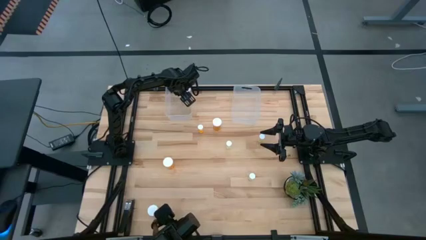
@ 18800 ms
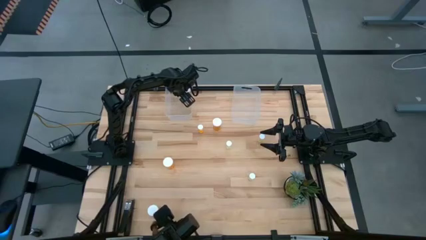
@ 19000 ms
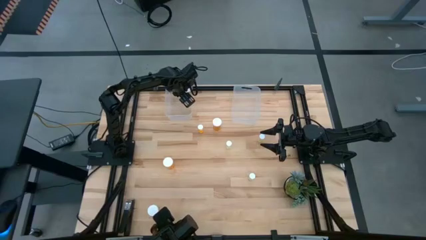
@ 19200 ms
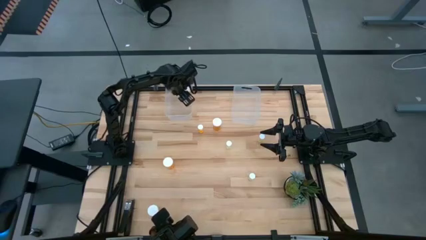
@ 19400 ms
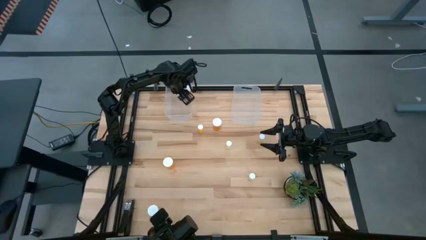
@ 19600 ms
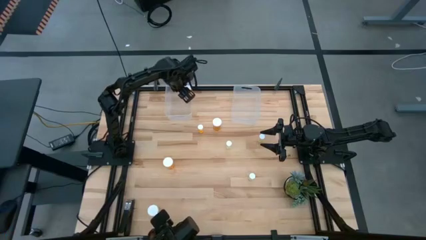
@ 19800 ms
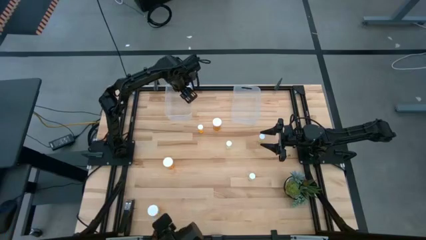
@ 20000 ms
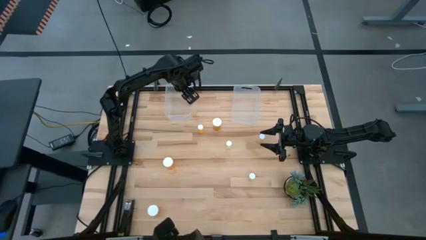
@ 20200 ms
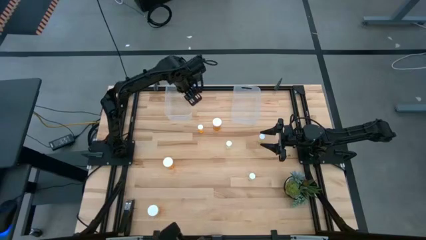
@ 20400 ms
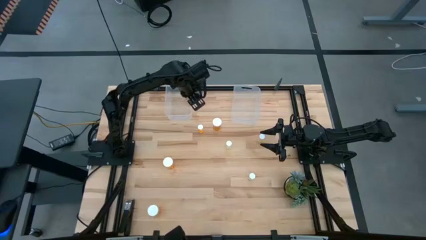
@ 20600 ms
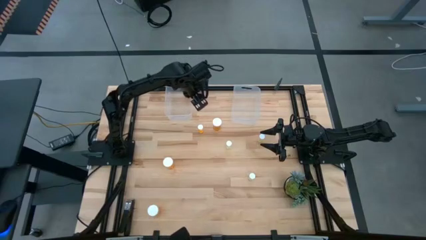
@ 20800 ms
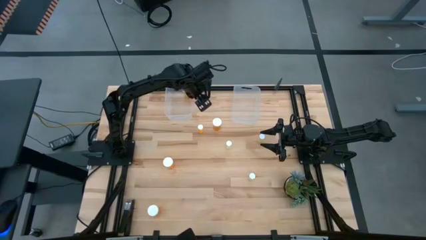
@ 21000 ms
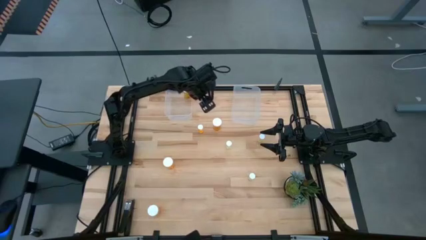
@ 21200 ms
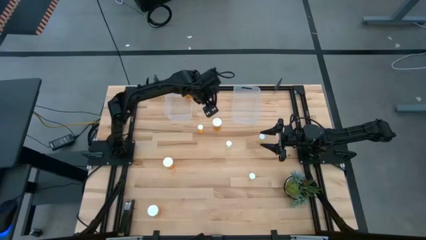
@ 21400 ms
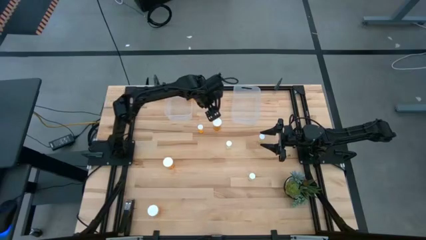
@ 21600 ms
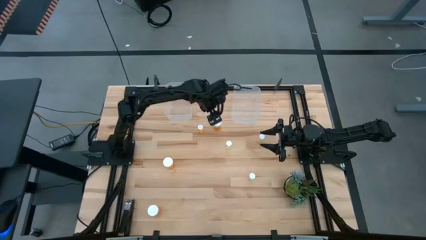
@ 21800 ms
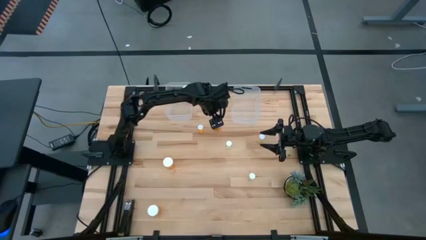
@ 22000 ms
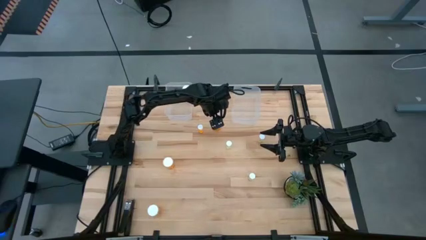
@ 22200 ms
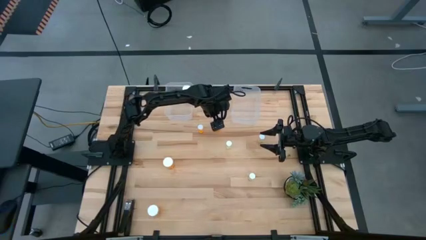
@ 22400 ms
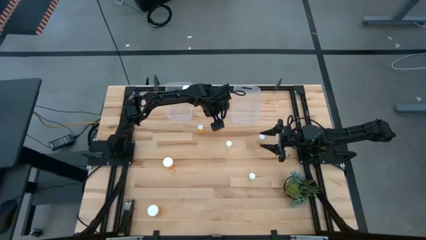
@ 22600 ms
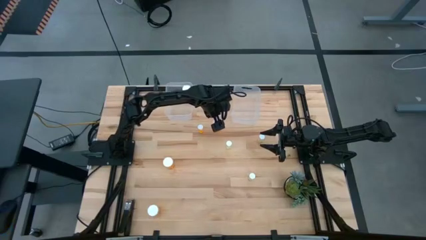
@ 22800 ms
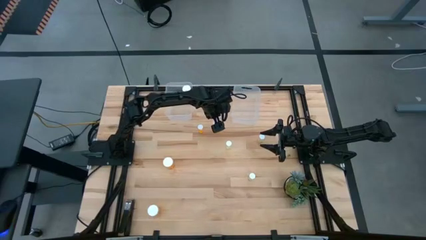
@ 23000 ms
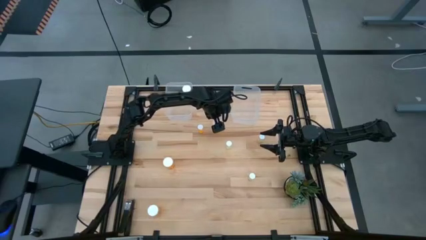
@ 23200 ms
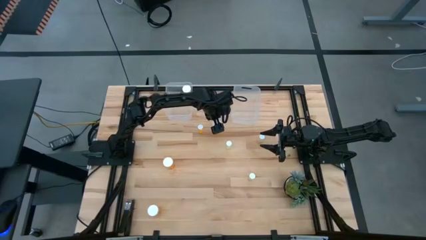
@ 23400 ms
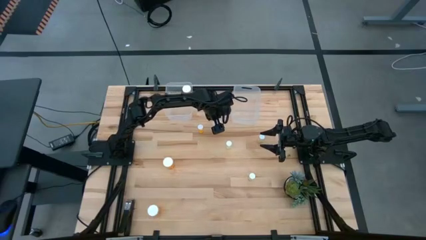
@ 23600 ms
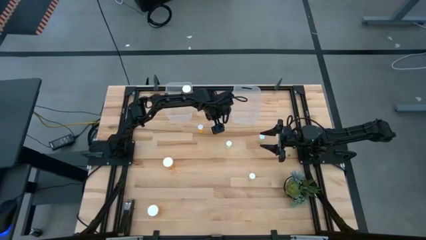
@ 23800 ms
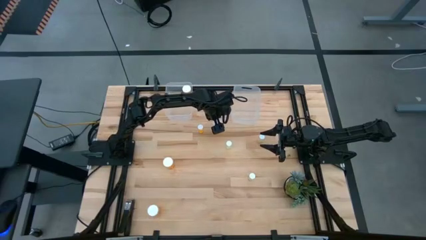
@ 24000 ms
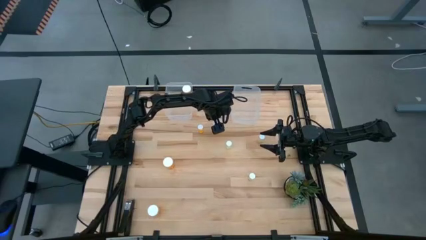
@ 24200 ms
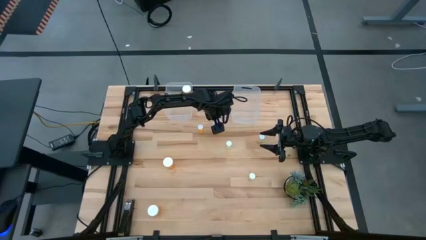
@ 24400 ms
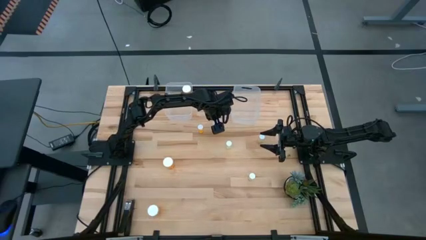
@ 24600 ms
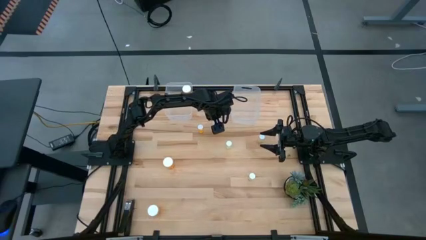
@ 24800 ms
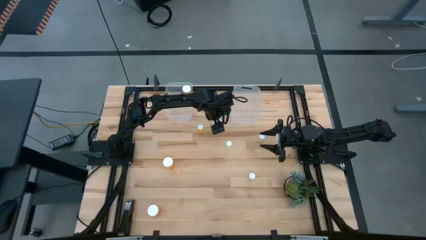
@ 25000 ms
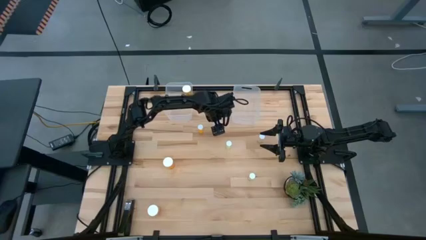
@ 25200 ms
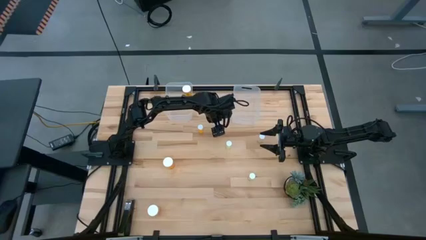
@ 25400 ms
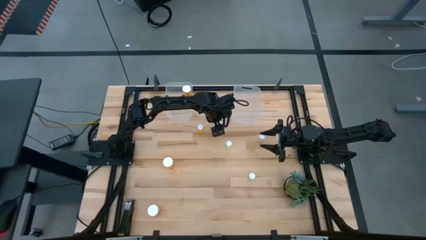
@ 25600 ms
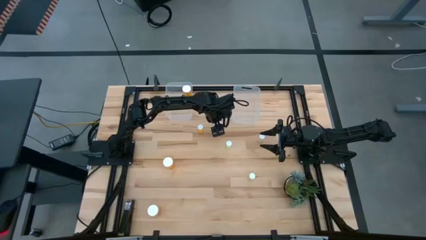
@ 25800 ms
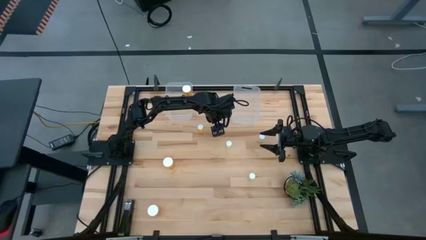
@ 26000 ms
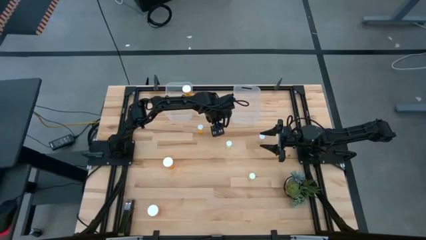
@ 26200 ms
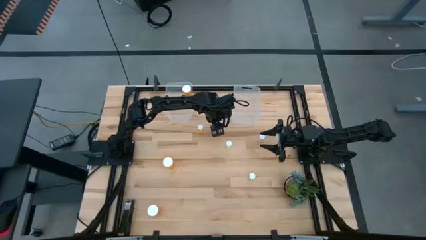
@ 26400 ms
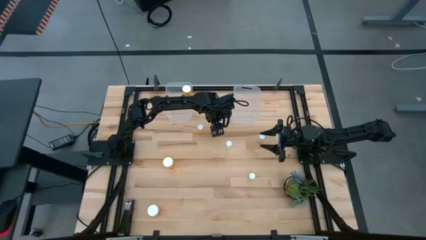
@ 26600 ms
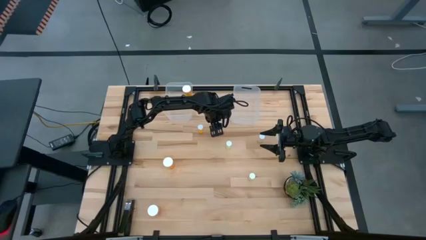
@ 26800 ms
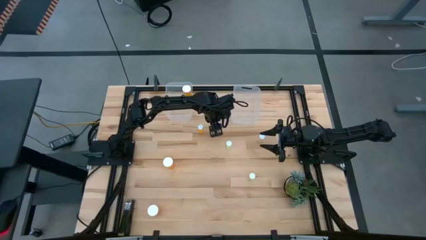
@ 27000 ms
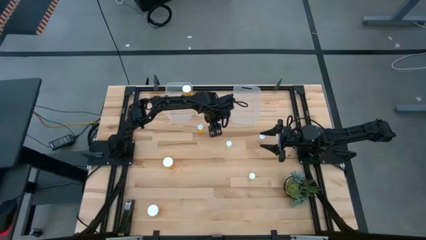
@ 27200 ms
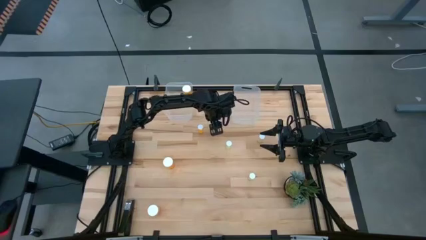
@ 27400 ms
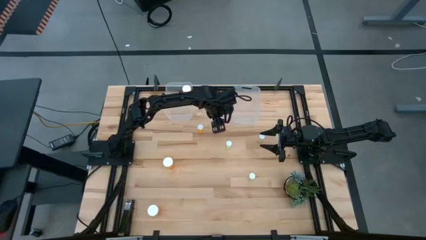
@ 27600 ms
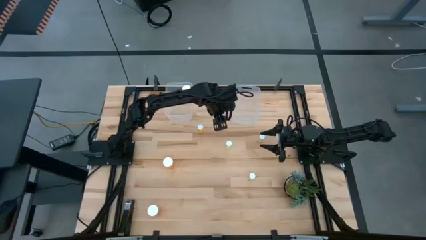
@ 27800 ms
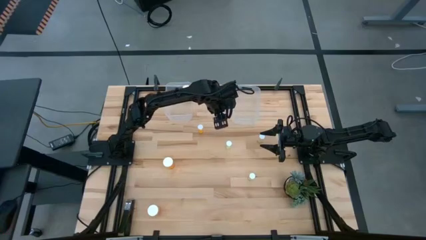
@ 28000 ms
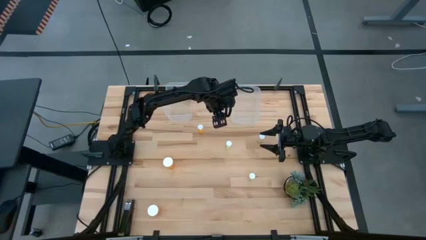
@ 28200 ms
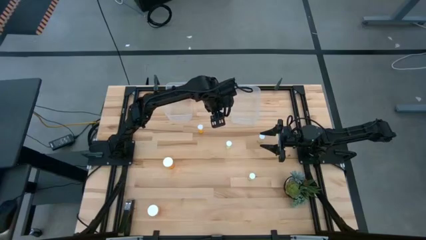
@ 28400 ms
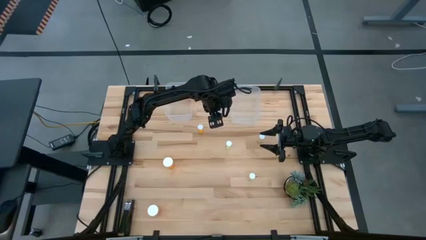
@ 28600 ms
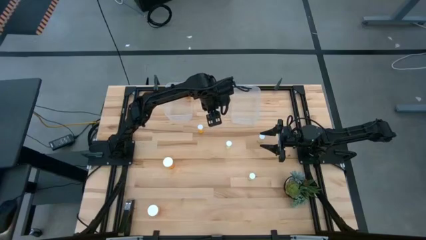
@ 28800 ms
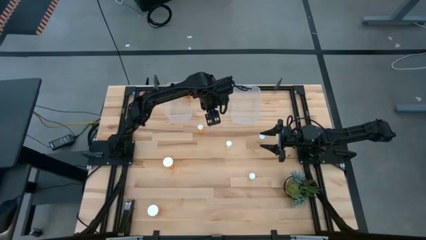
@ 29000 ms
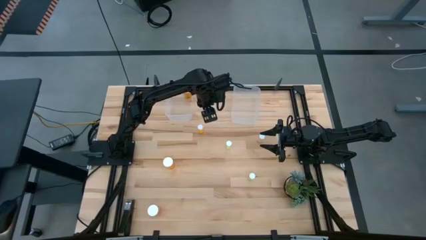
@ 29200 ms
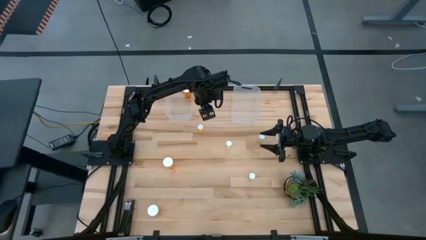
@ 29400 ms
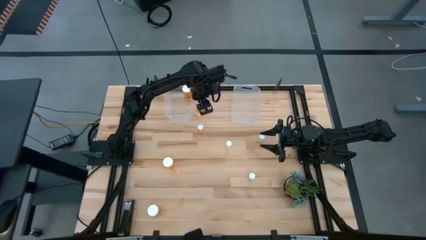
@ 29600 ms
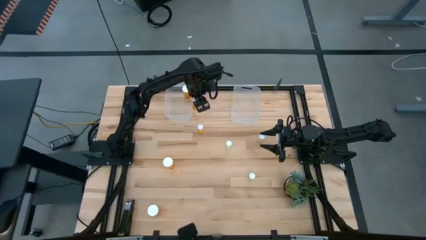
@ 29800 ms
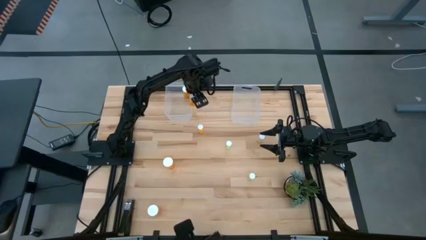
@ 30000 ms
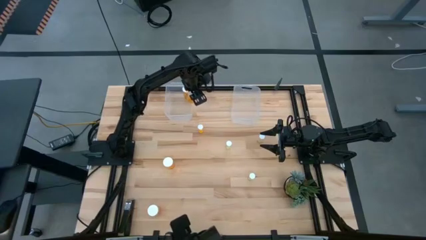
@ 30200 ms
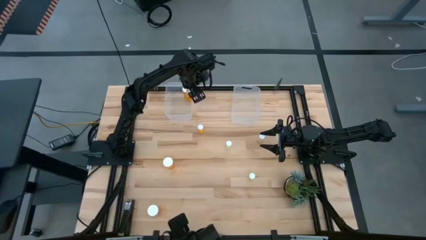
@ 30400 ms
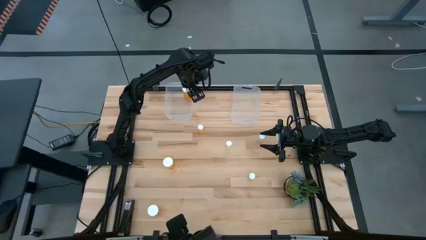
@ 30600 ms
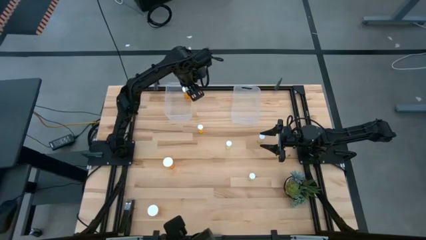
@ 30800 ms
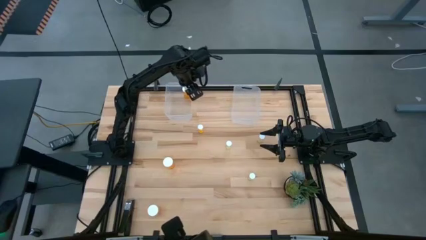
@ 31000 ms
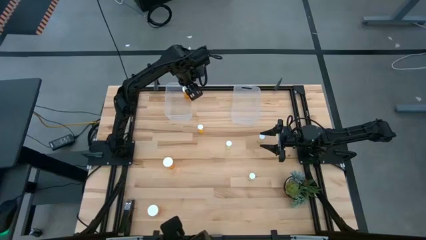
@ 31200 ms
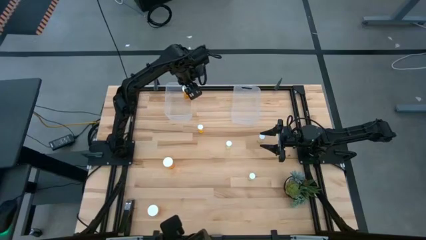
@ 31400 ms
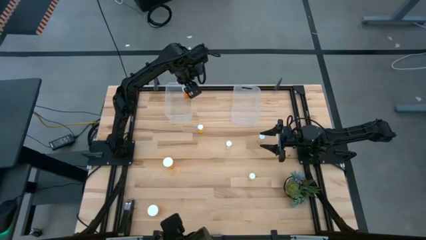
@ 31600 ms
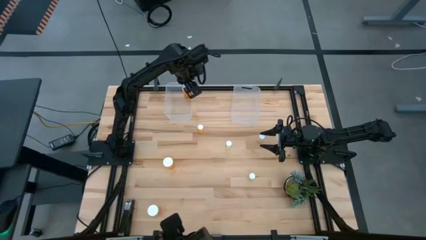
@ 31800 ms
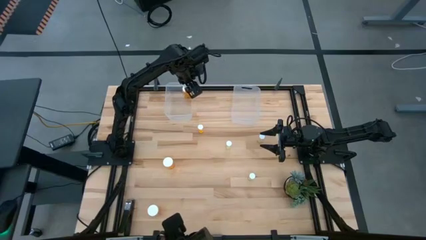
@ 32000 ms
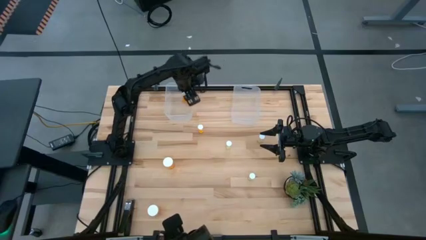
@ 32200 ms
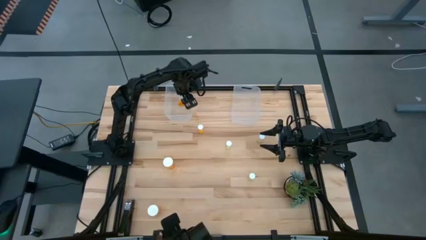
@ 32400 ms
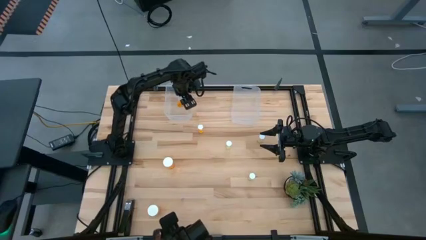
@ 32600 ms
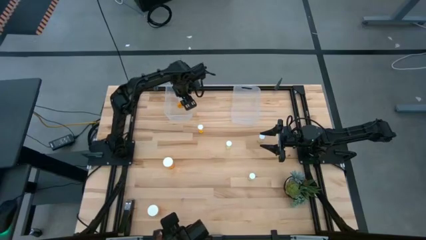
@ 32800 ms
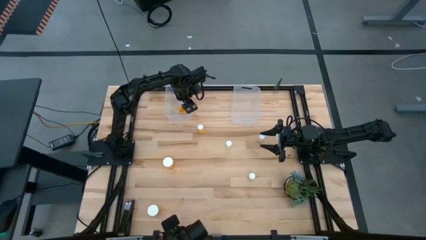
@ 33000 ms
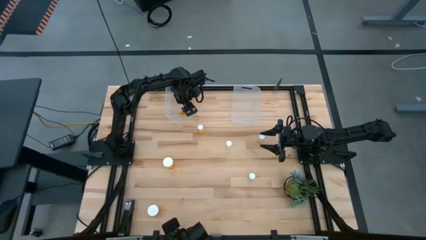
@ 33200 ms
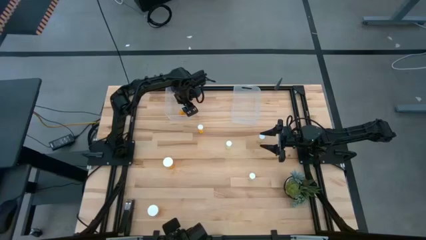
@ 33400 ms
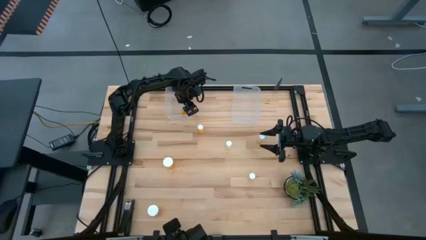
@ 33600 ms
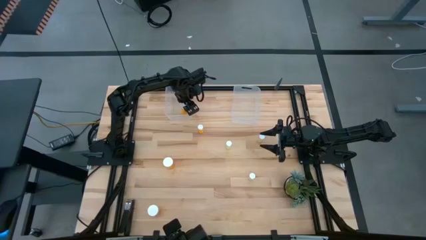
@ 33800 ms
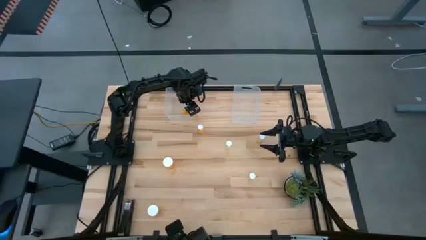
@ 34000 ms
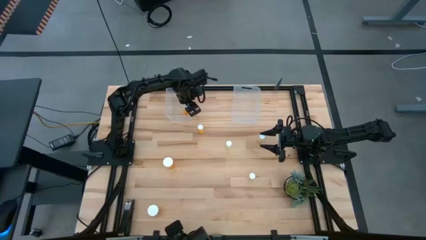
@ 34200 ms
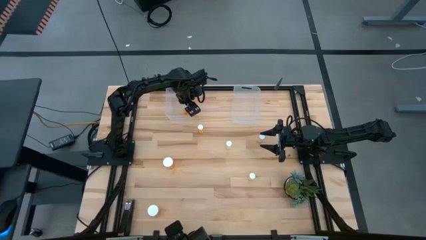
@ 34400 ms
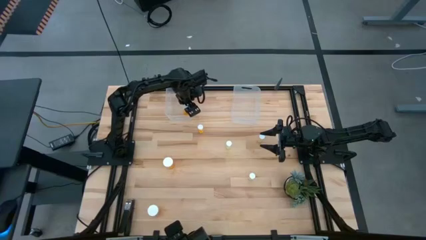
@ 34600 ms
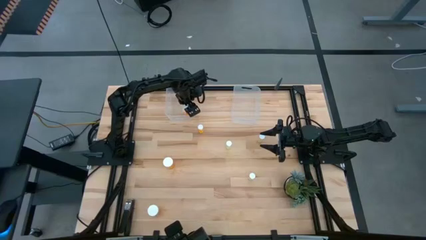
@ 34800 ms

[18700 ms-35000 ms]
Task: Pick and place medicine bottles into bin by pill shape (circle, oval)
Put the large orange pill bottle into the left transparent bin
